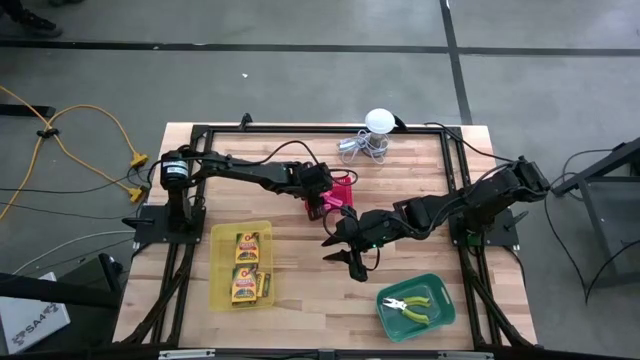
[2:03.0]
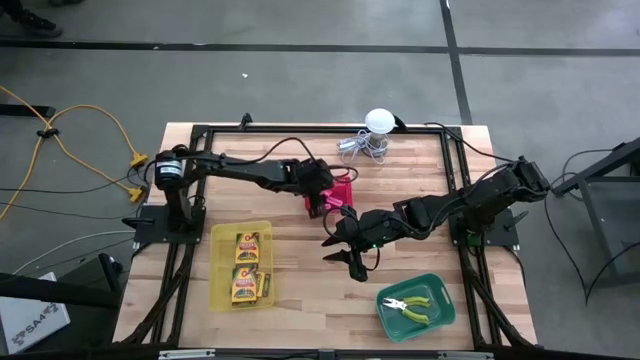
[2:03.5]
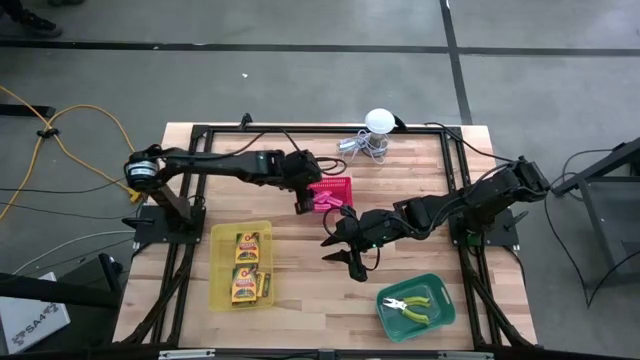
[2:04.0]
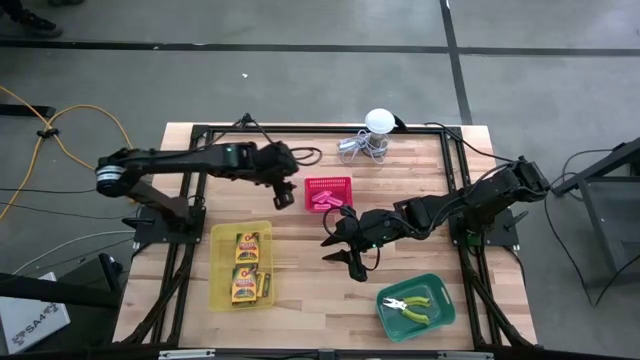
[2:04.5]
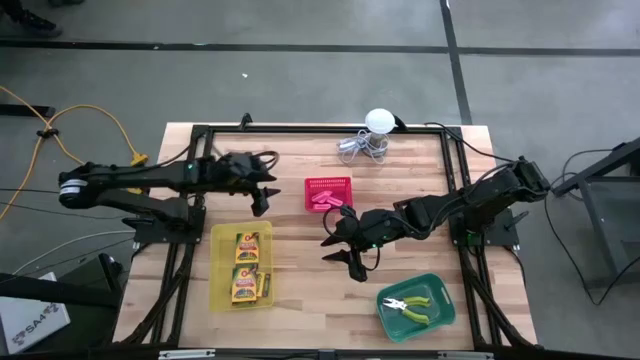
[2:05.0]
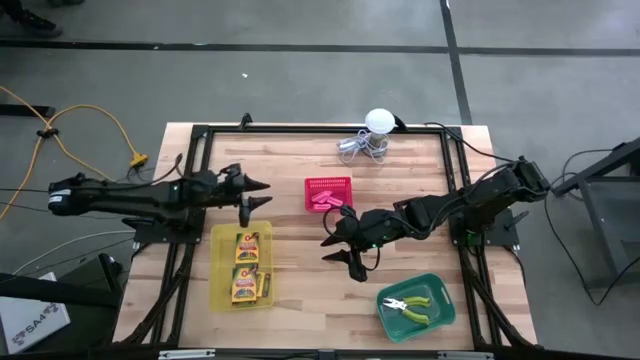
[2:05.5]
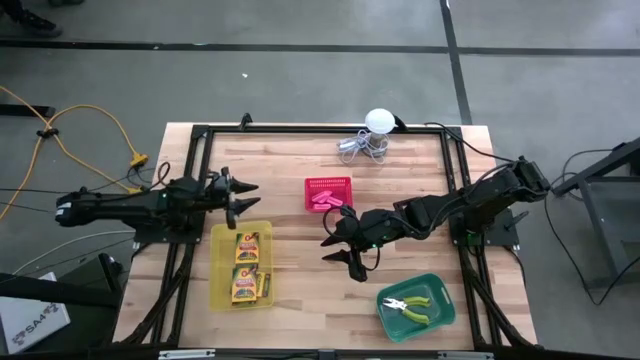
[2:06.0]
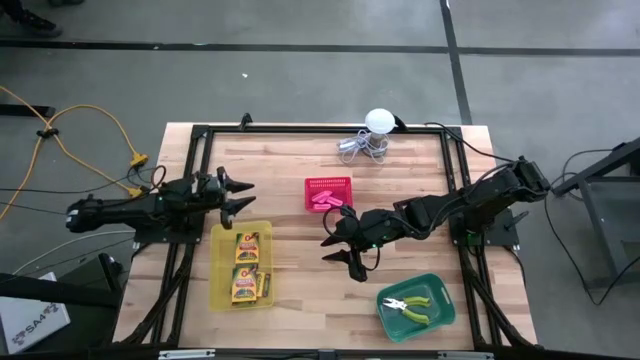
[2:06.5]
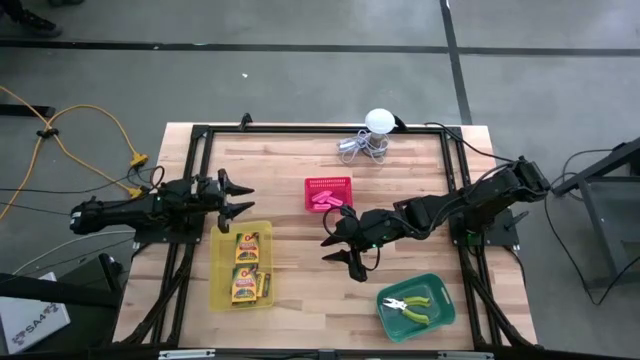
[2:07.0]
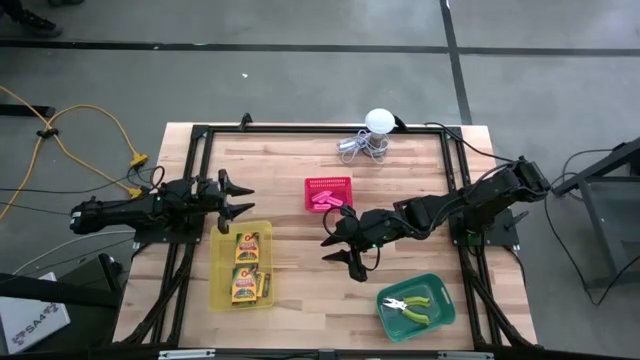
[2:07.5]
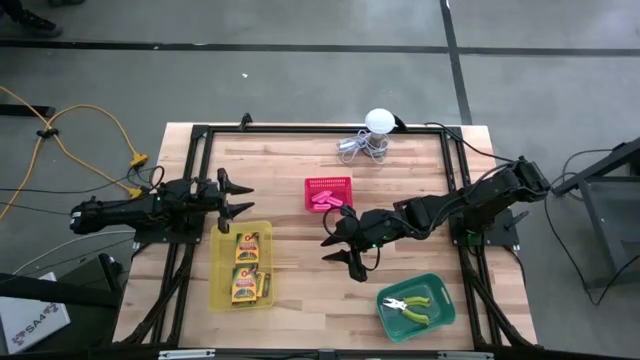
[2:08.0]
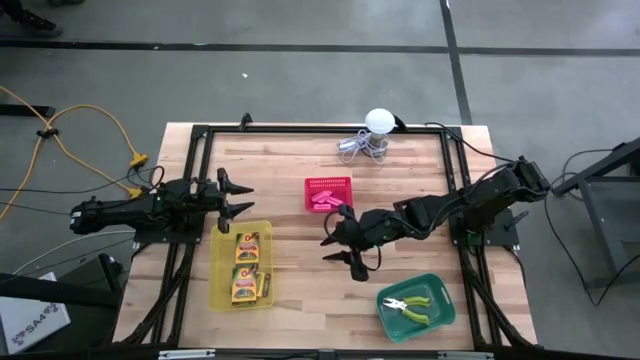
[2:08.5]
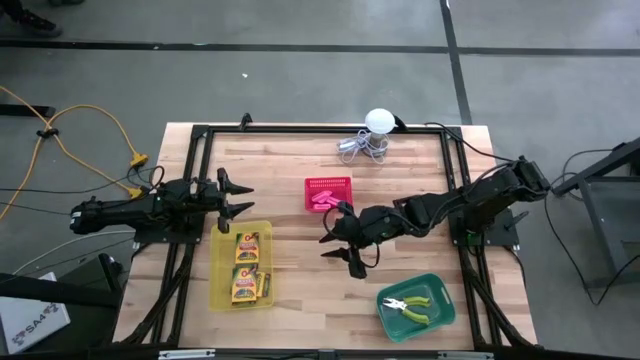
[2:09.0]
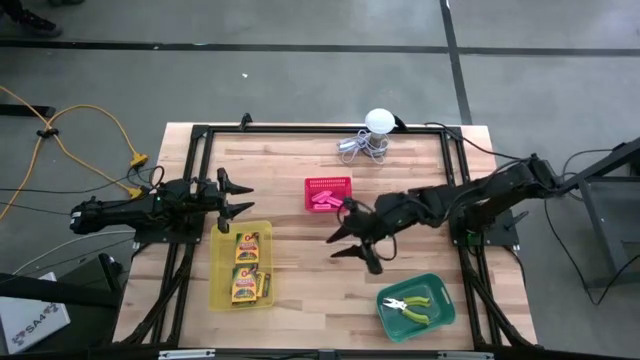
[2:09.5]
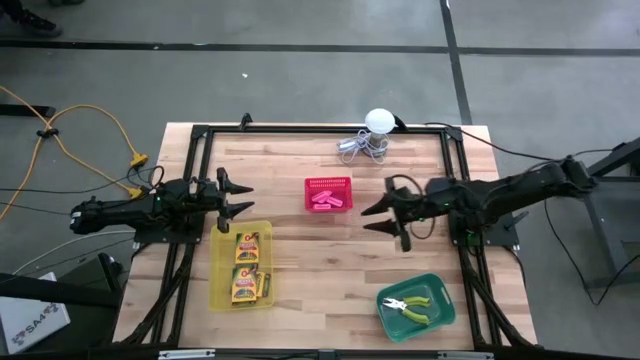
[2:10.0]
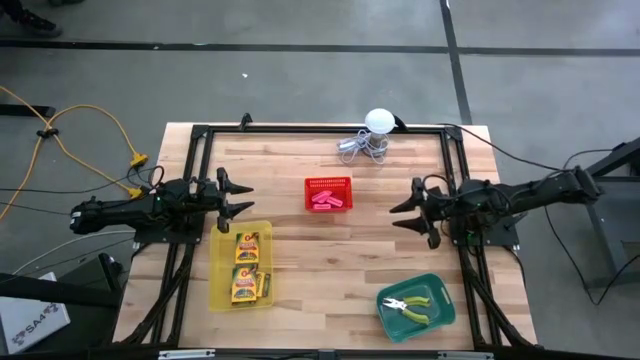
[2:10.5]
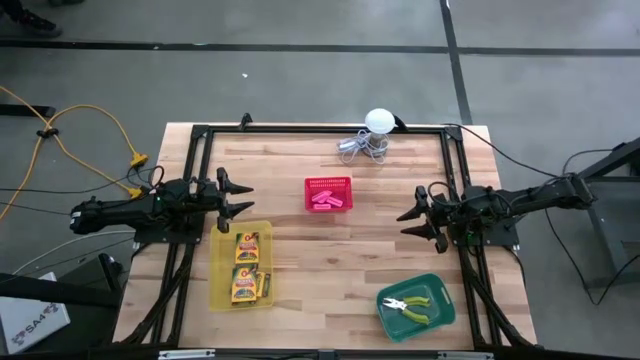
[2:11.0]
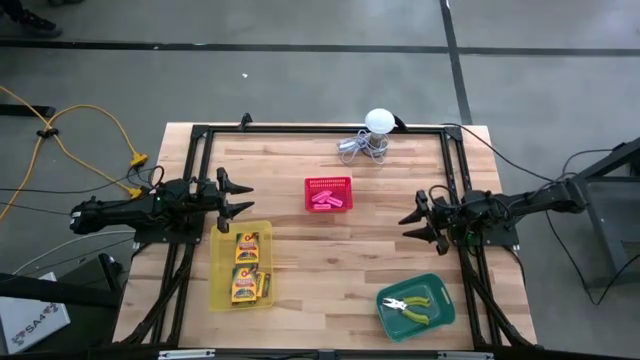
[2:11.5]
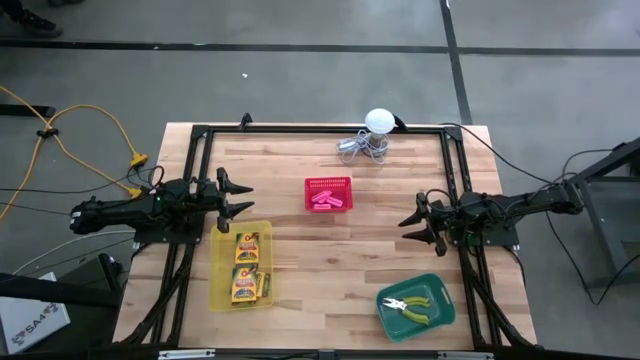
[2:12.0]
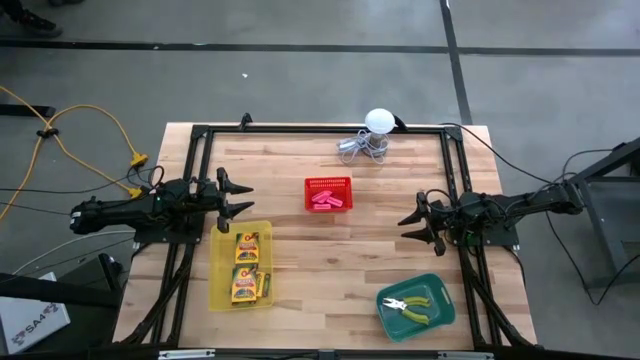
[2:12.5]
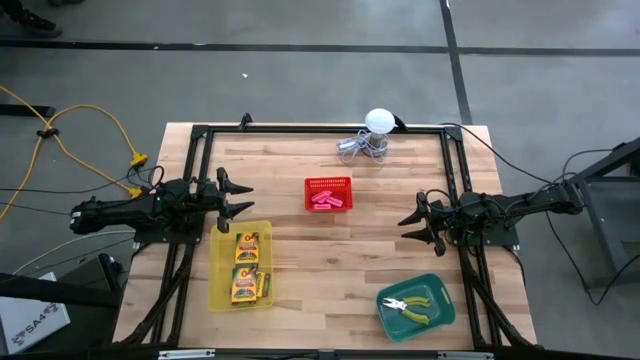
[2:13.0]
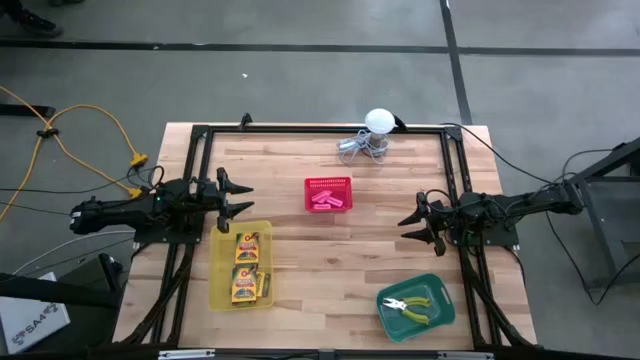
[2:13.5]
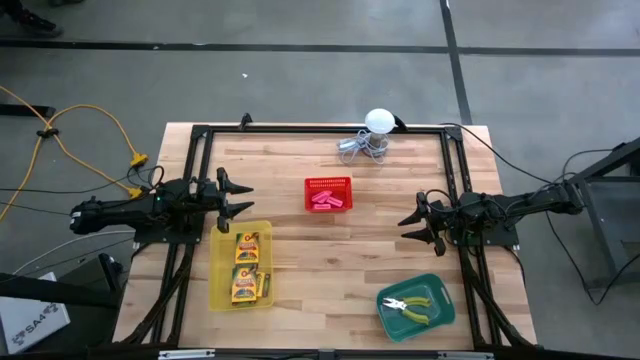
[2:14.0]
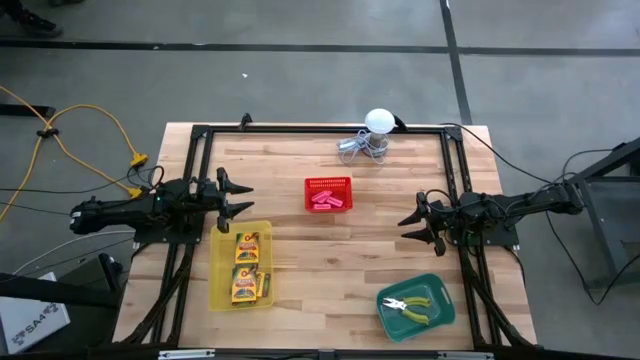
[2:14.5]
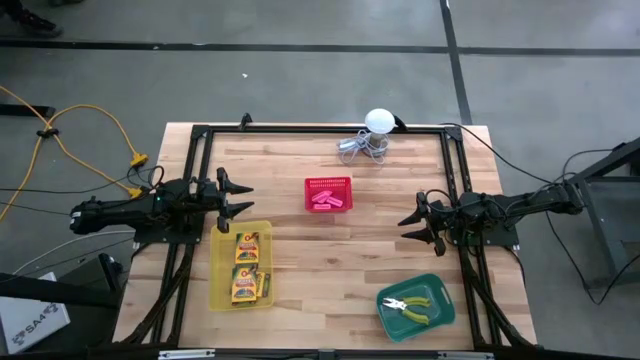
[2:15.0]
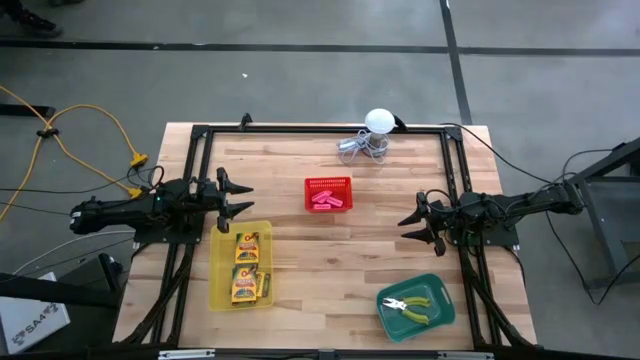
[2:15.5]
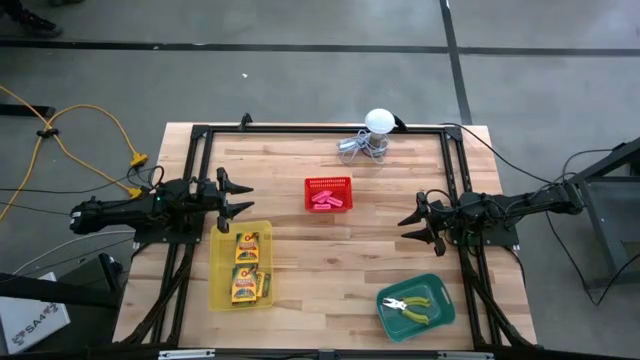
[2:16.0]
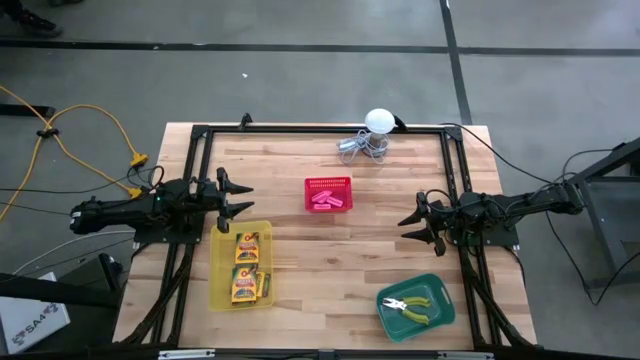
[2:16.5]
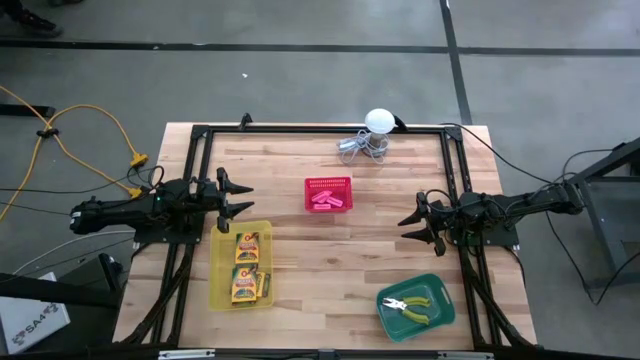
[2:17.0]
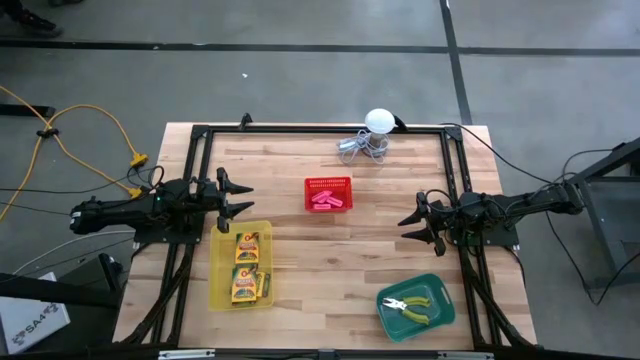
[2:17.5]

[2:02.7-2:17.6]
Task: Pick & Place School Supplies
Return to Home Position

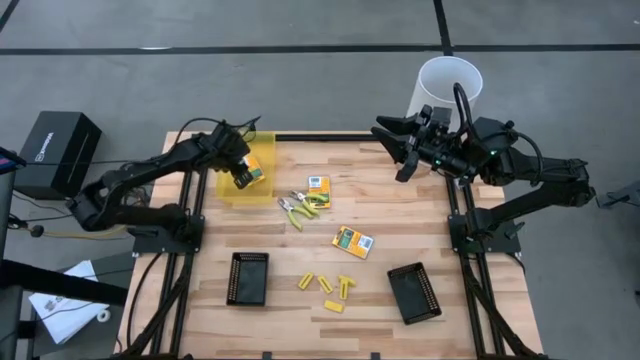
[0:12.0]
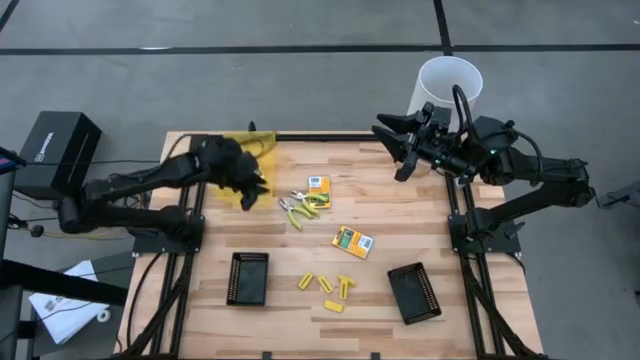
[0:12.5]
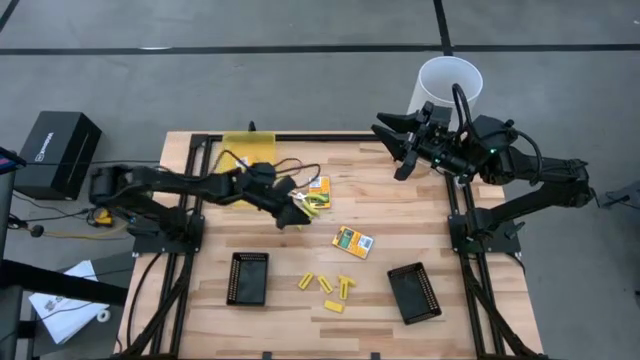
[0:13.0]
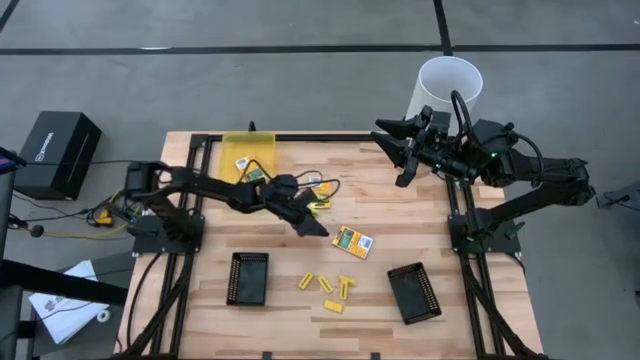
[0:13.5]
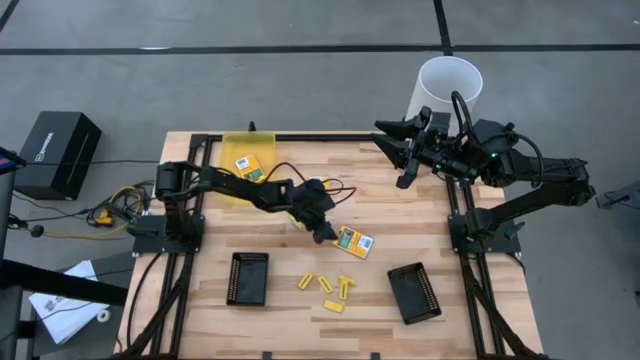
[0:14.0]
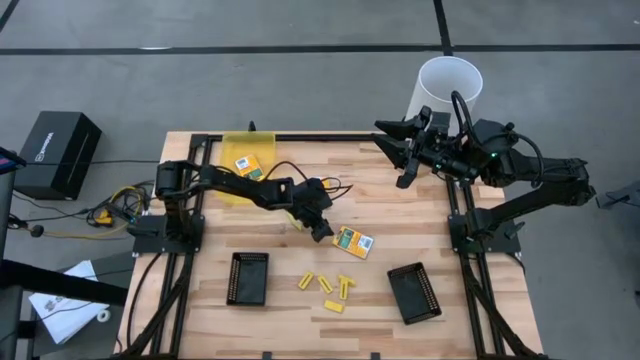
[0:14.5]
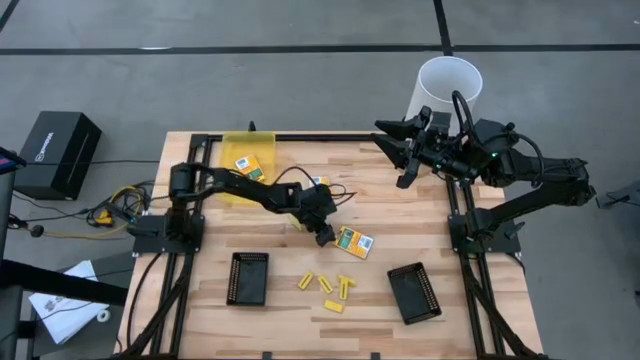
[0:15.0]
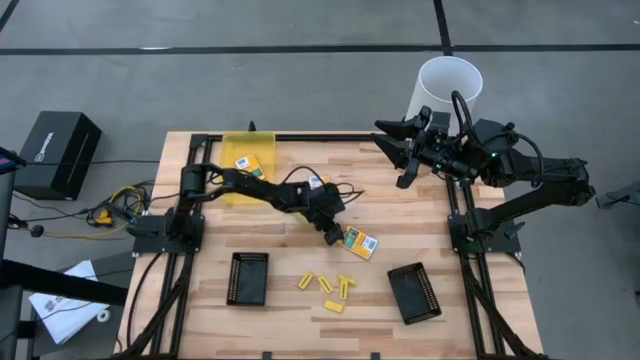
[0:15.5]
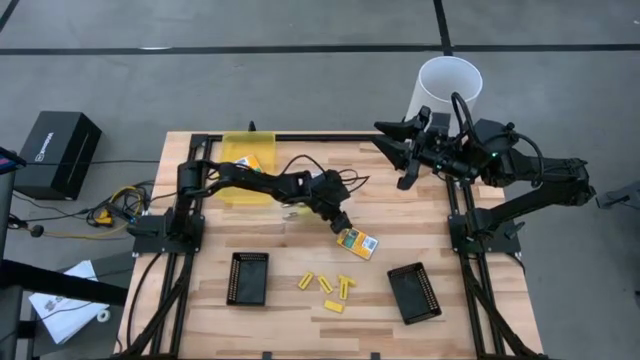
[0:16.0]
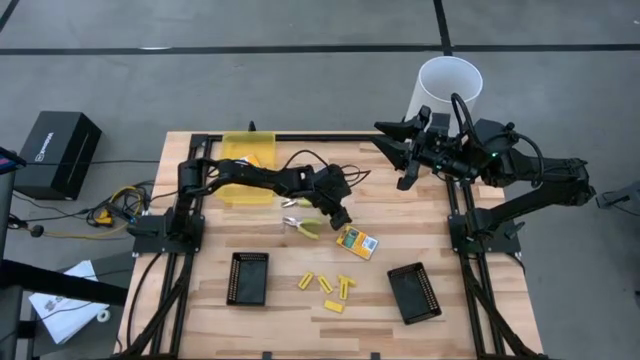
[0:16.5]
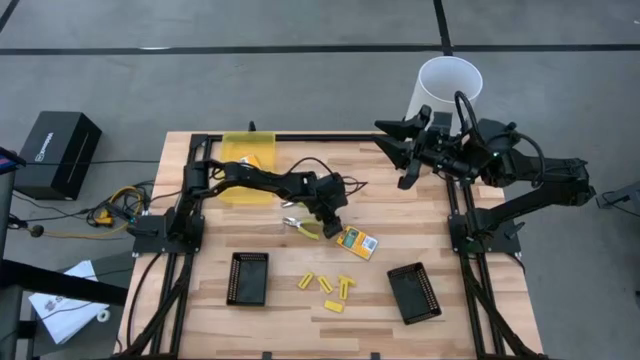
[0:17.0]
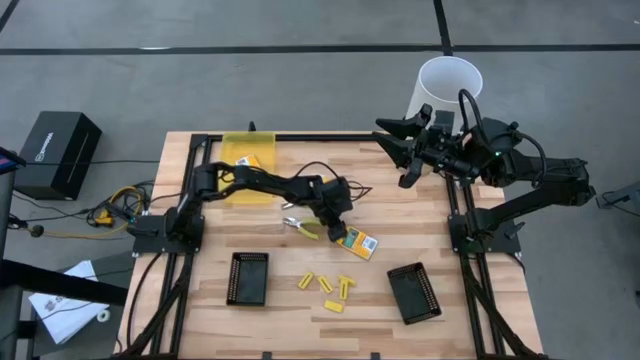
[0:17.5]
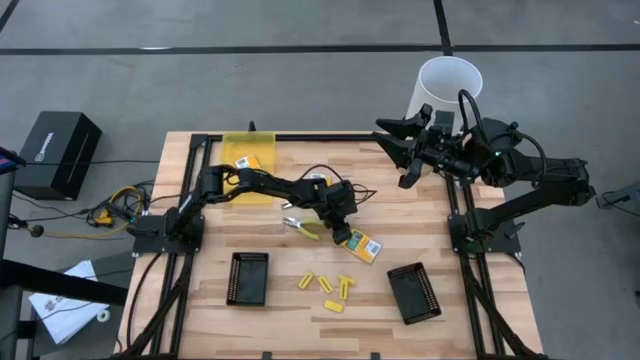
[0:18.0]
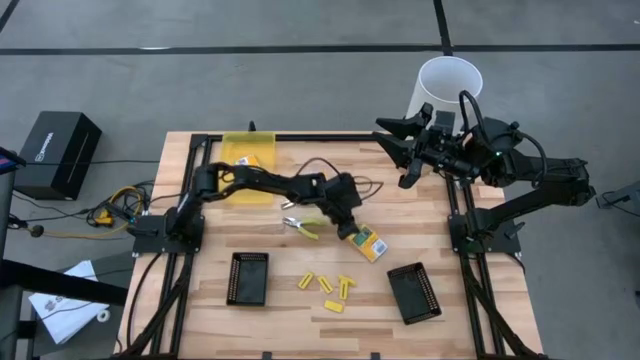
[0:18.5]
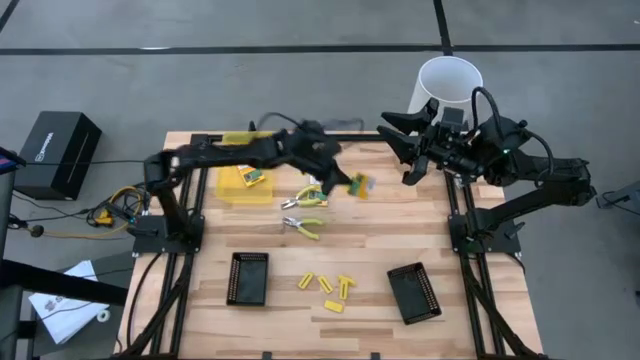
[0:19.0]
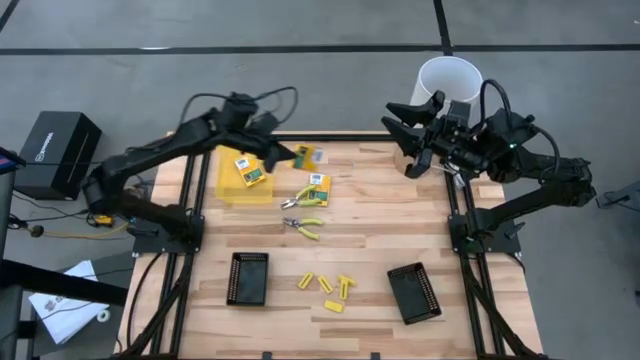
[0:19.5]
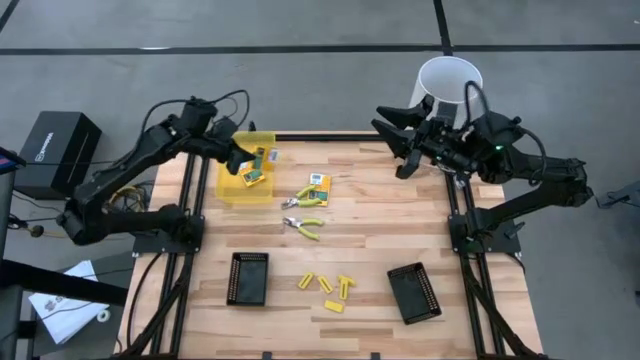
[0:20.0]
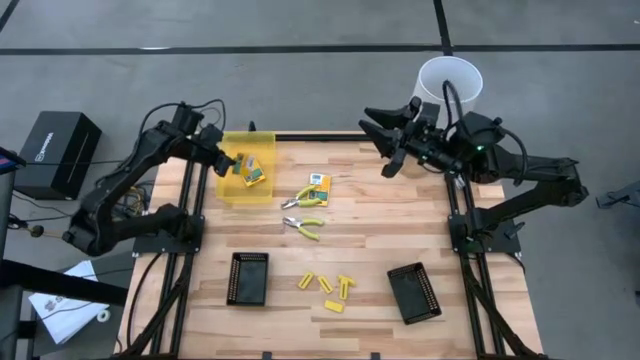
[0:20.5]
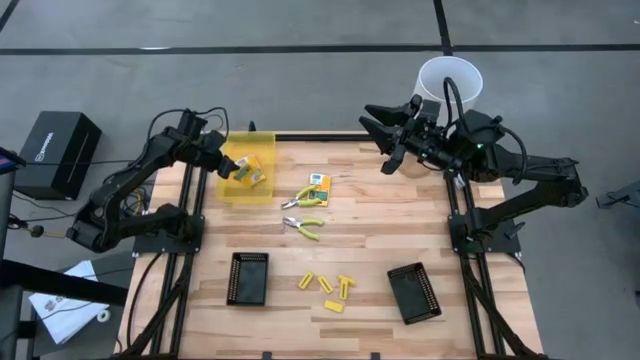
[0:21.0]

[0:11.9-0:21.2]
Task: Pick & Place School Supplies
Put the yellow crayon box into the yellow bin
